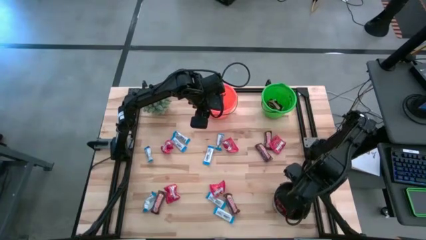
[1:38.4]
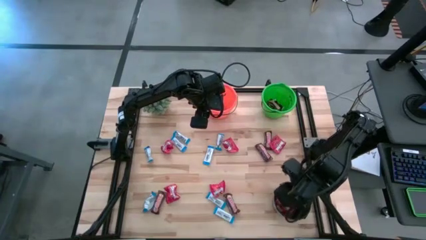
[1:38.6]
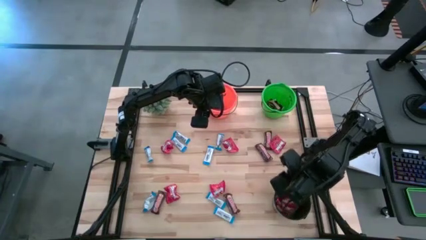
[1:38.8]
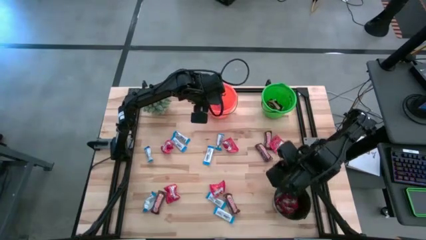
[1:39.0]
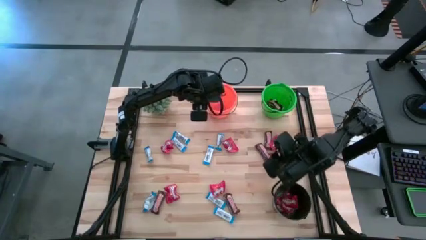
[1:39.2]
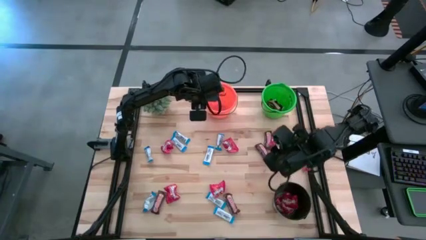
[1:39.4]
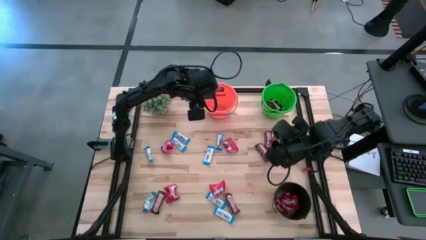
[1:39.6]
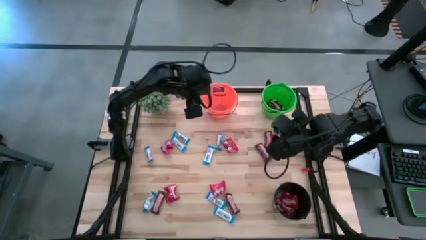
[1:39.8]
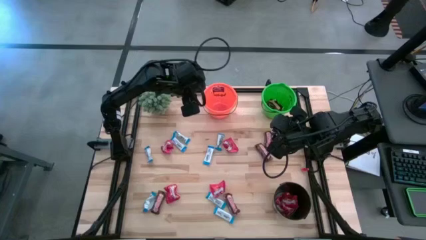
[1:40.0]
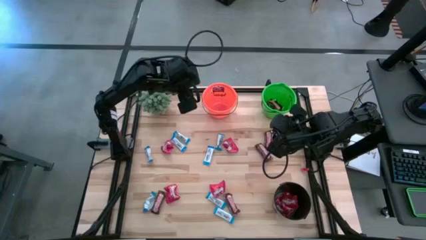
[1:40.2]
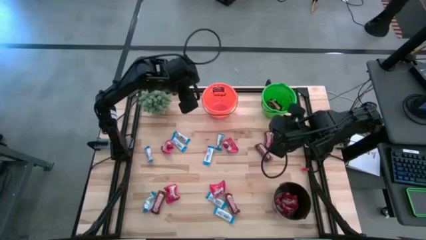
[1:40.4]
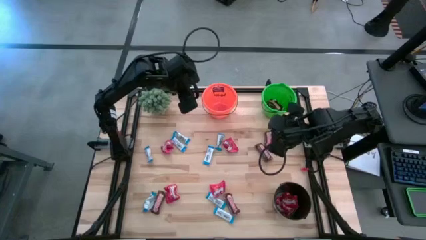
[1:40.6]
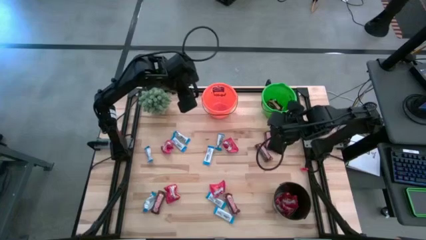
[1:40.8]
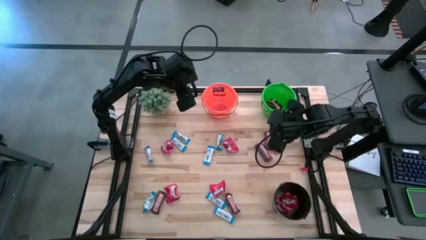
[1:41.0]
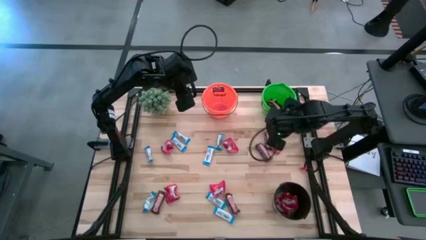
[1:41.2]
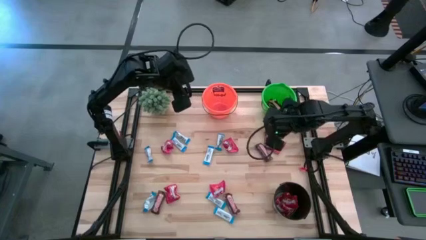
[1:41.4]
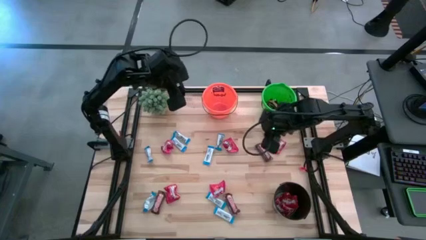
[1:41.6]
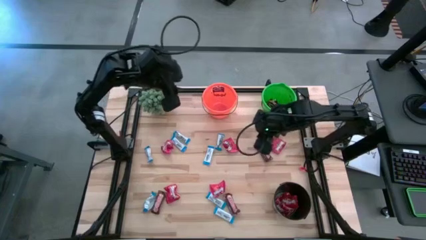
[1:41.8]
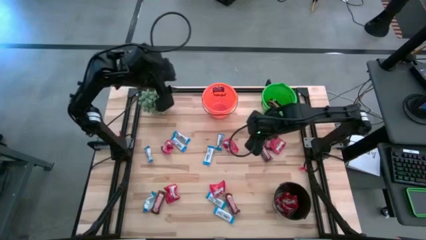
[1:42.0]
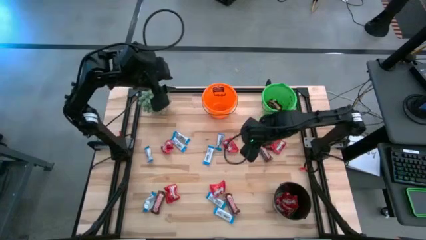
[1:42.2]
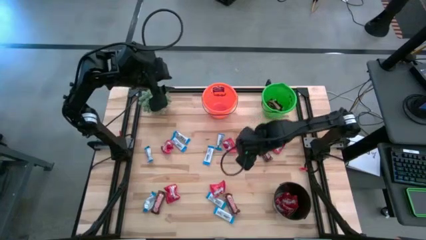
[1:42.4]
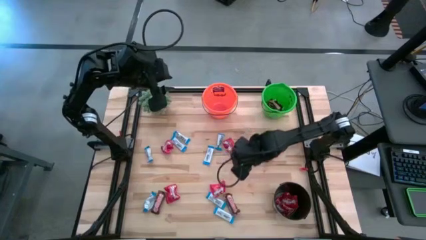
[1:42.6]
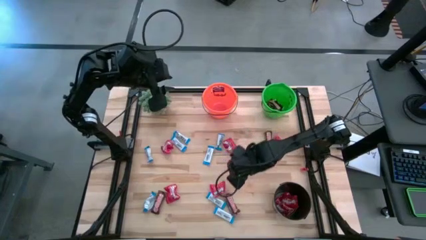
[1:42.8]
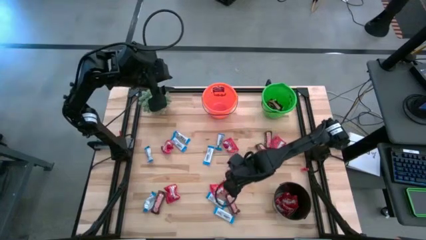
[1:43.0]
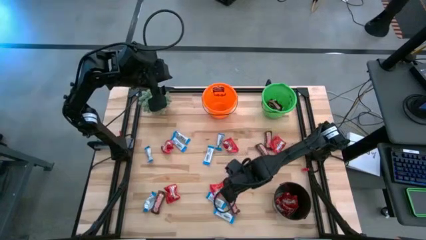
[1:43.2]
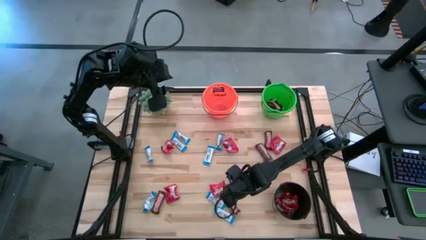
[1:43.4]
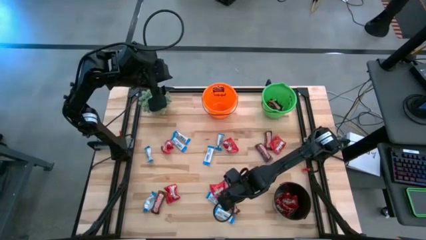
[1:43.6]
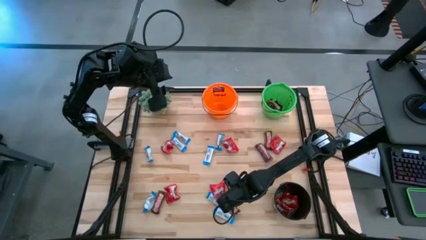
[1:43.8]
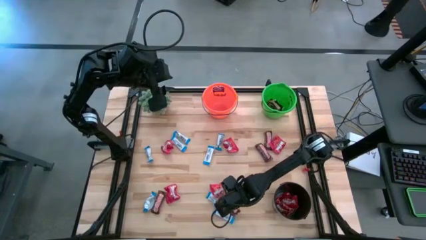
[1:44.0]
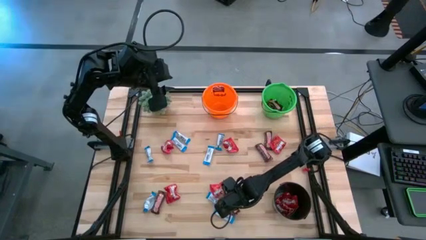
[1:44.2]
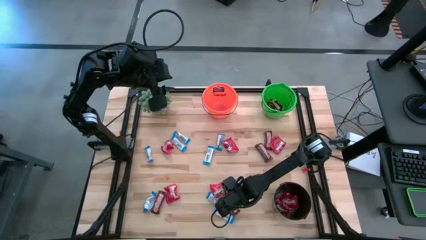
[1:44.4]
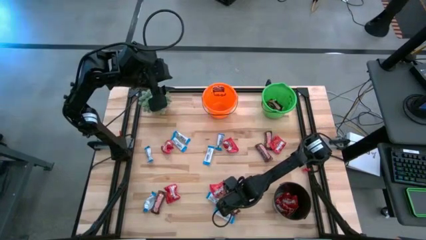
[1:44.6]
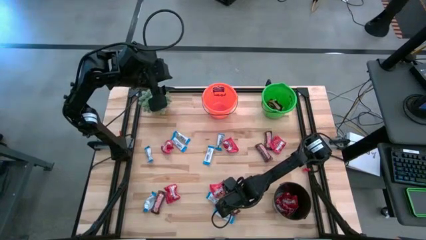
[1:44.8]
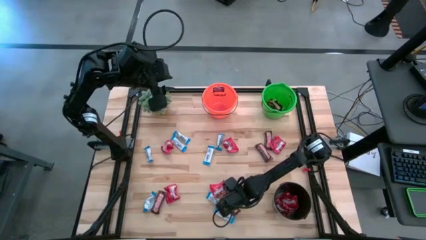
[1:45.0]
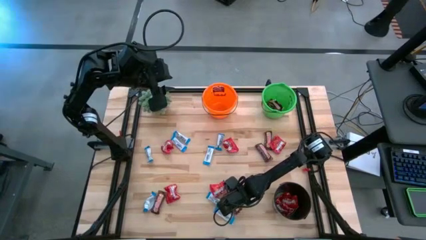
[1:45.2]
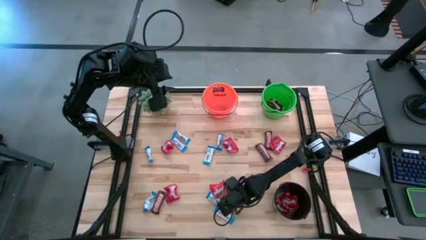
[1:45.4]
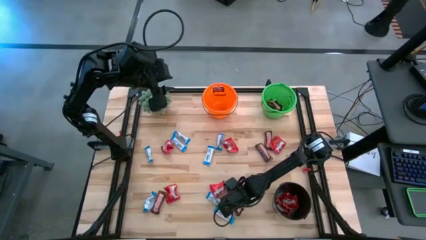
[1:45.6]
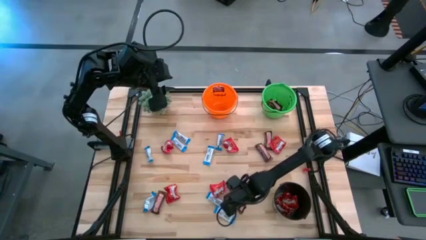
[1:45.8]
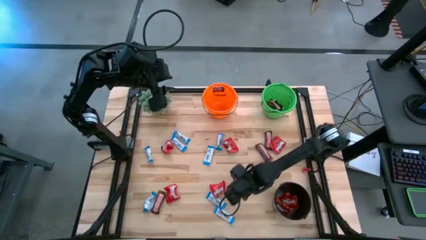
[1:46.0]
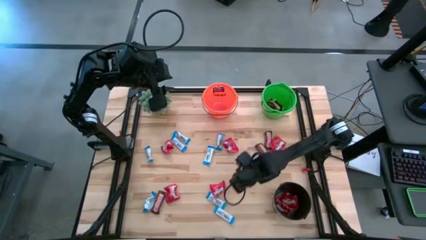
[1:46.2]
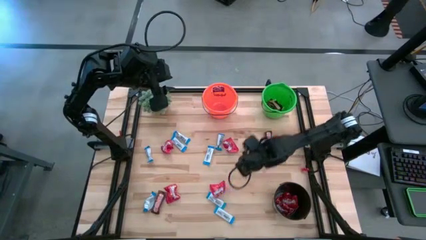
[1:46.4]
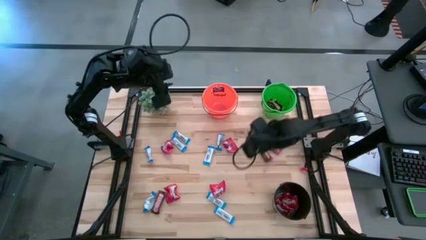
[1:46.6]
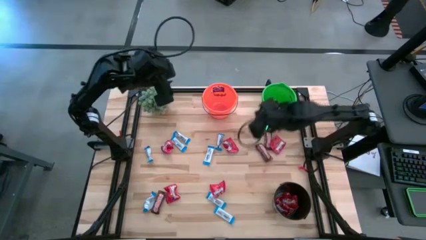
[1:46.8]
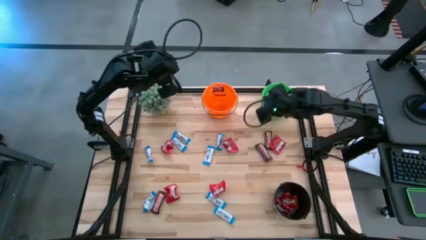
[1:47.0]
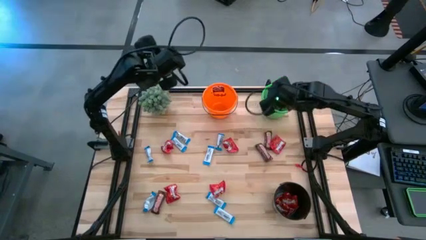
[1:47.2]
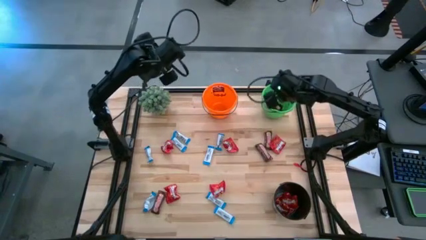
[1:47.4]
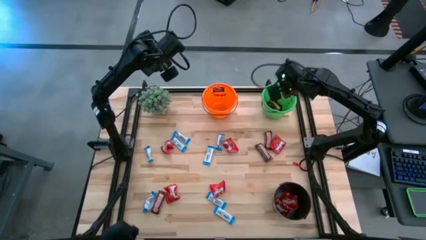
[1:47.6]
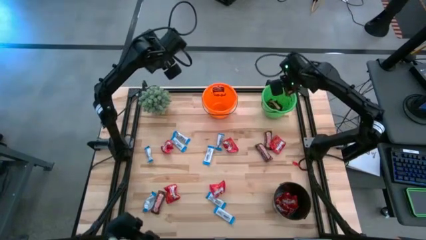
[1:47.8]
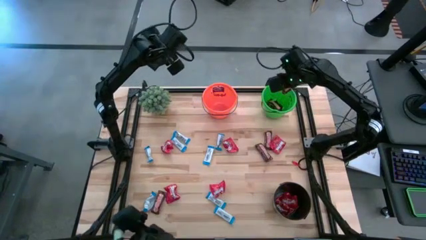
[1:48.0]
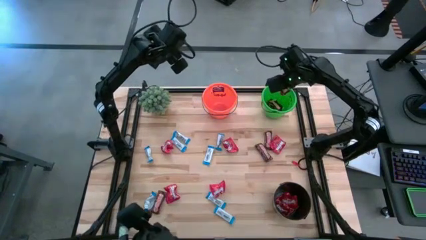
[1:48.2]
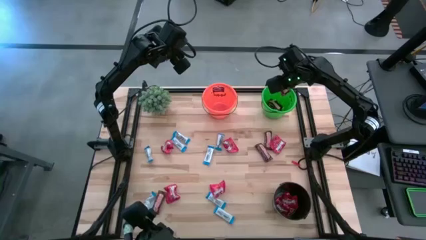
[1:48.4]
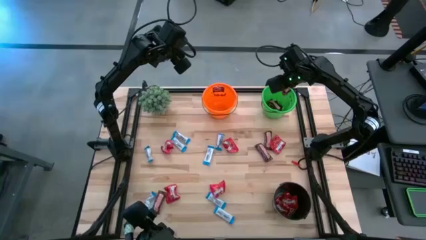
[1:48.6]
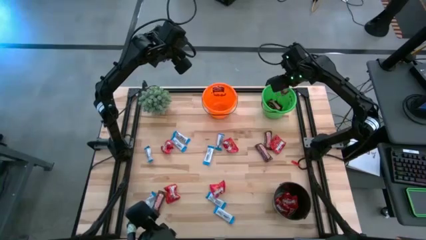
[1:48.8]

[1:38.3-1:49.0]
Task: Organize candy in baskets
Put the brown chocolate into the green bucket

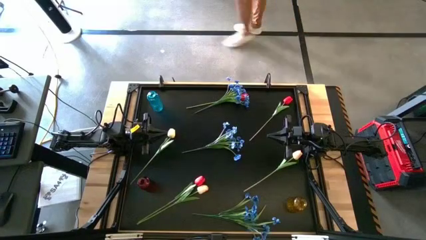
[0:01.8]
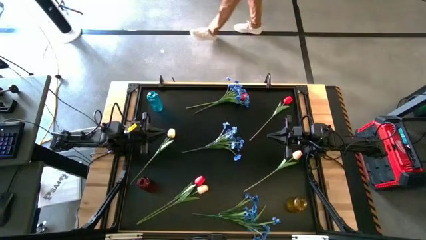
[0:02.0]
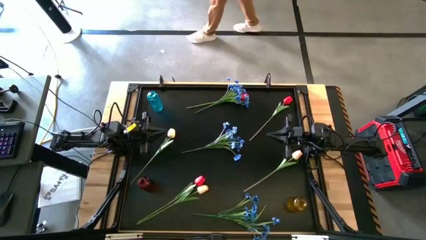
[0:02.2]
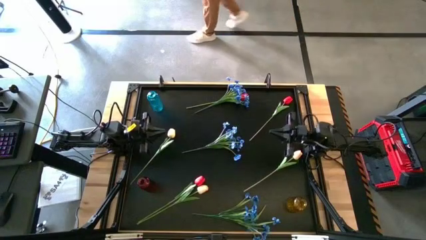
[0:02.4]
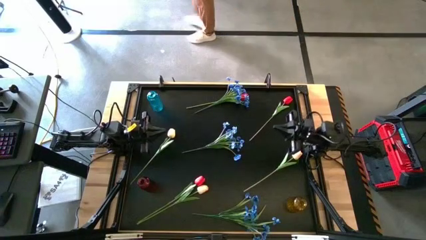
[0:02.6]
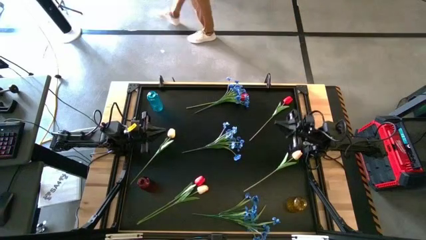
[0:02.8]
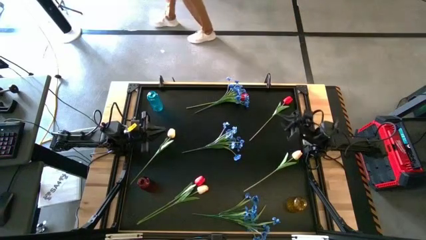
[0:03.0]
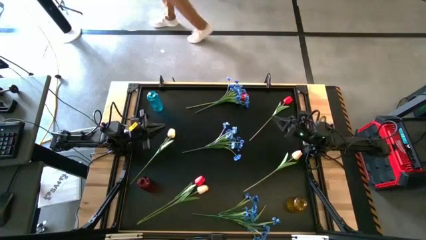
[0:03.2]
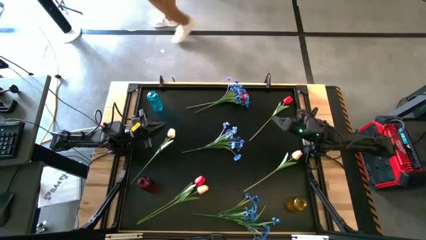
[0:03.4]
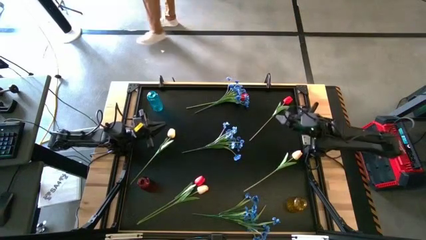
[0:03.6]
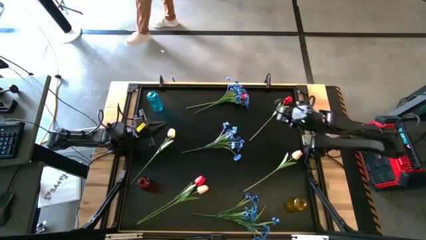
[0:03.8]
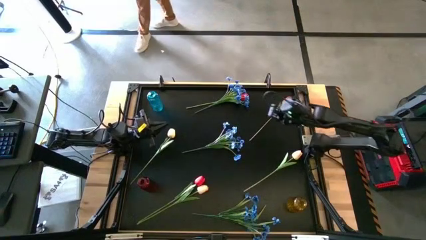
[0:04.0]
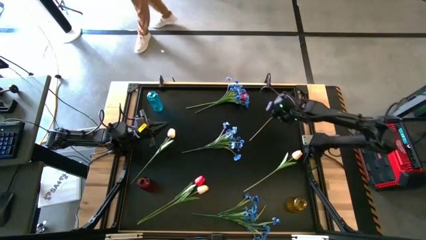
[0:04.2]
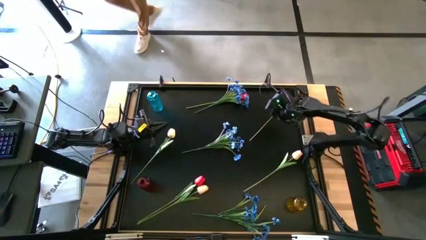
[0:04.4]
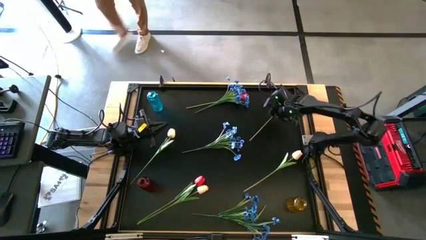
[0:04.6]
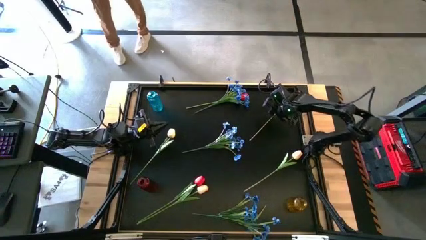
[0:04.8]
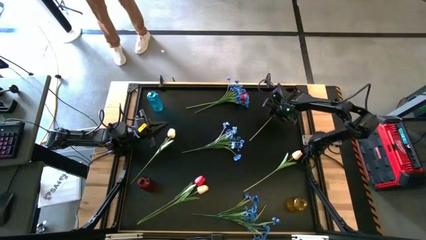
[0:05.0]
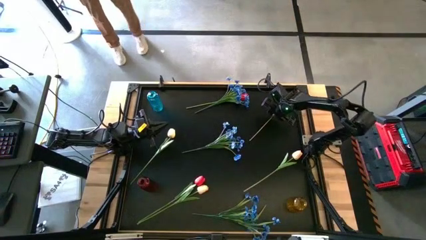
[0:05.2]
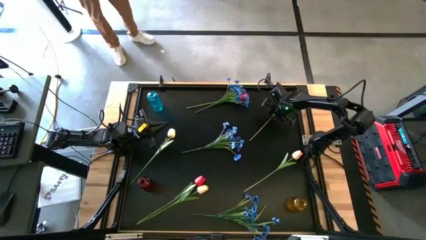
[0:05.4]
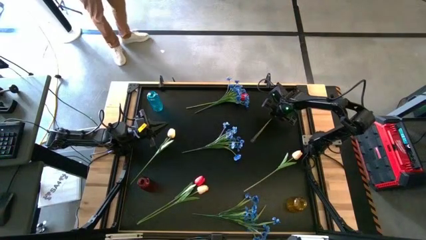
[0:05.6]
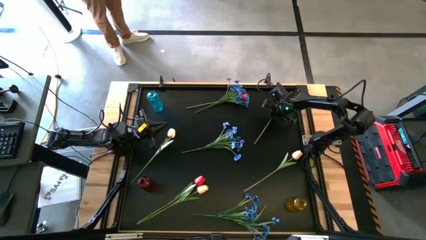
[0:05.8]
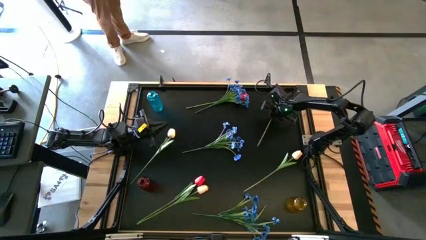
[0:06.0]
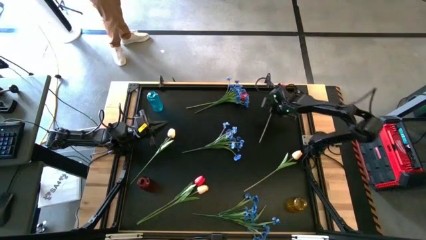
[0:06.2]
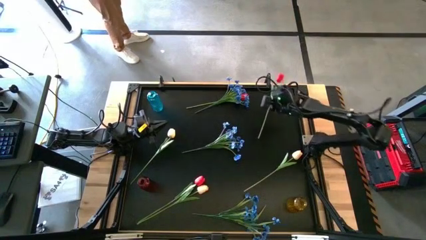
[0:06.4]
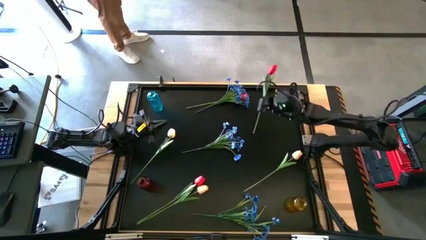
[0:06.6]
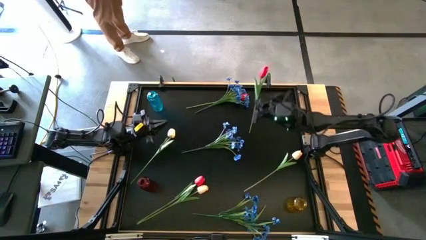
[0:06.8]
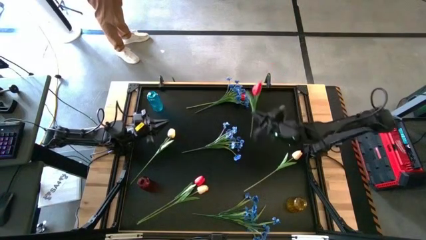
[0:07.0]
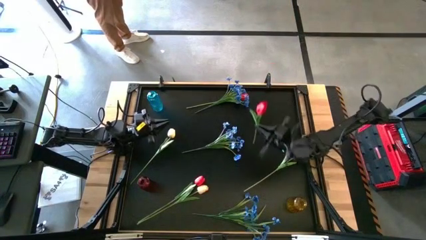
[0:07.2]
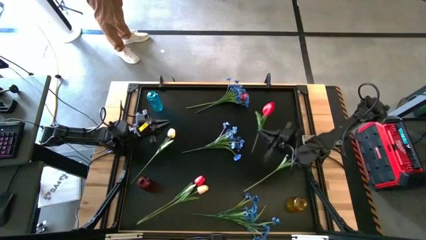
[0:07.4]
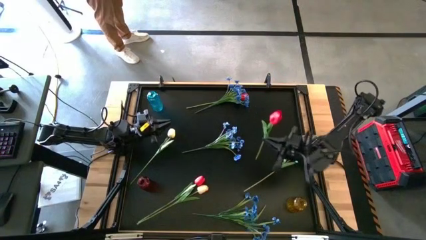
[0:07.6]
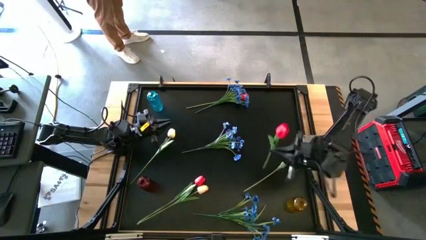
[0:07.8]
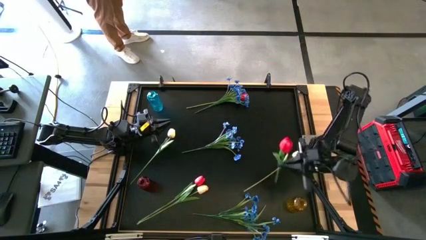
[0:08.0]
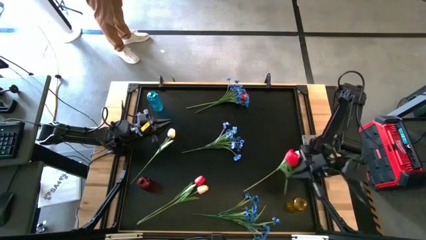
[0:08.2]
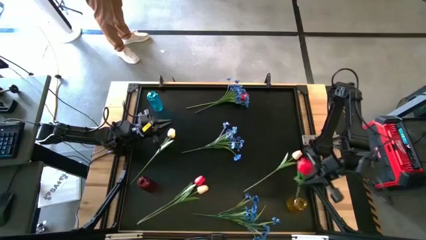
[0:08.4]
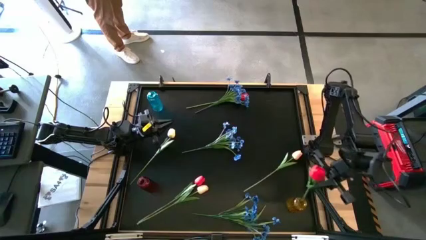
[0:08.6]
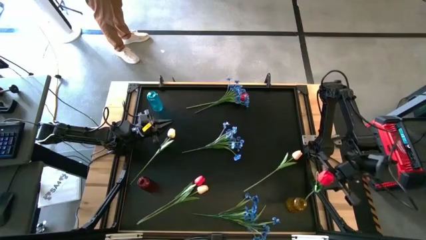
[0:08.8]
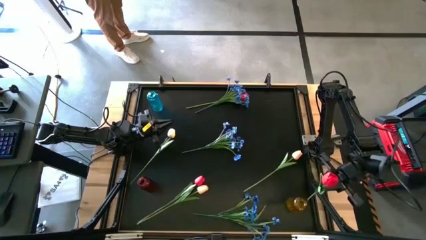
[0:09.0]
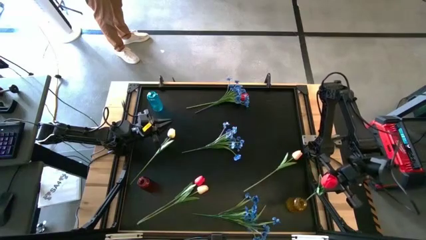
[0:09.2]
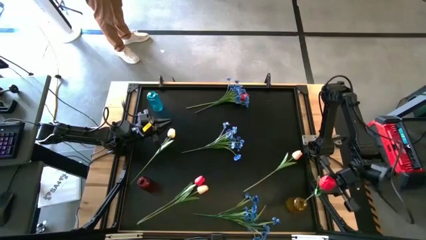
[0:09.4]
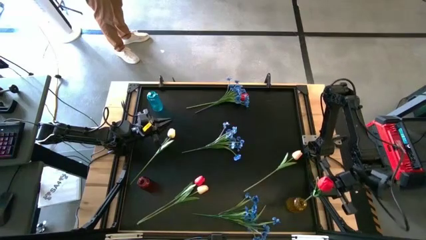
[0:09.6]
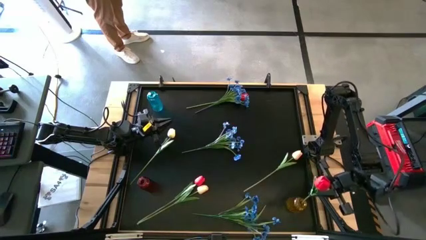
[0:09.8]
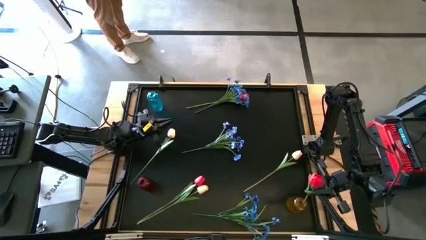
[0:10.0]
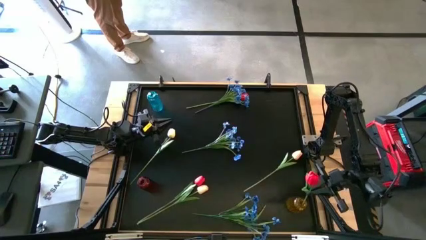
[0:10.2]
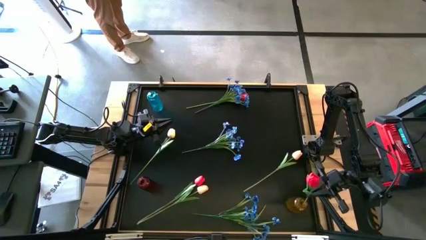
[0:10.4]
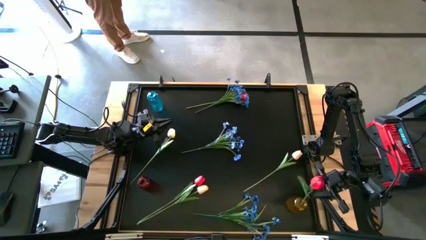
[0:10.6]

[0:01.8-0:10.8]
Task: Sort flowers into vase by color
Put the top right red flower into the yellow vase
